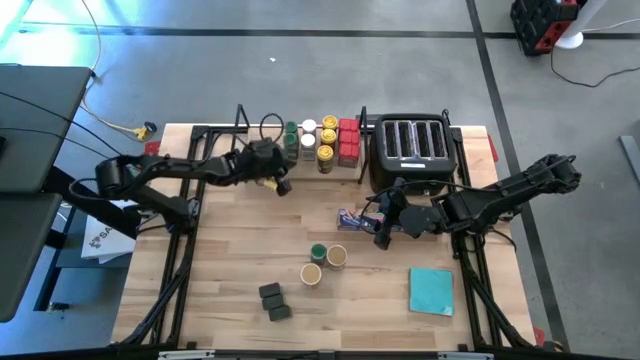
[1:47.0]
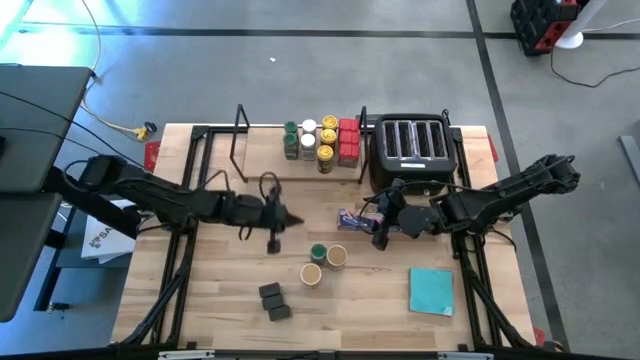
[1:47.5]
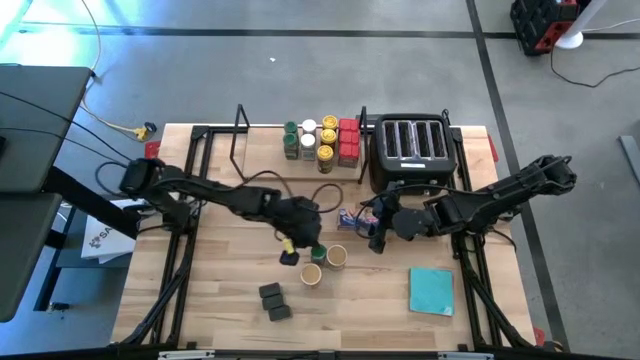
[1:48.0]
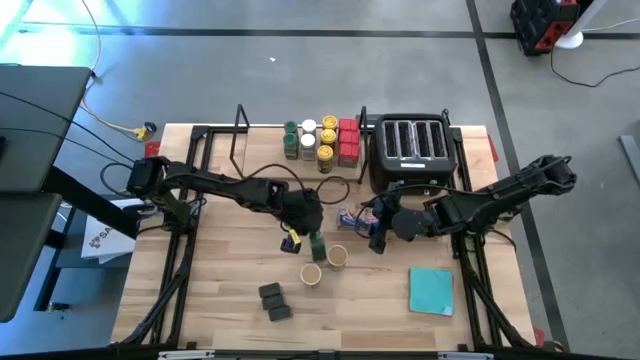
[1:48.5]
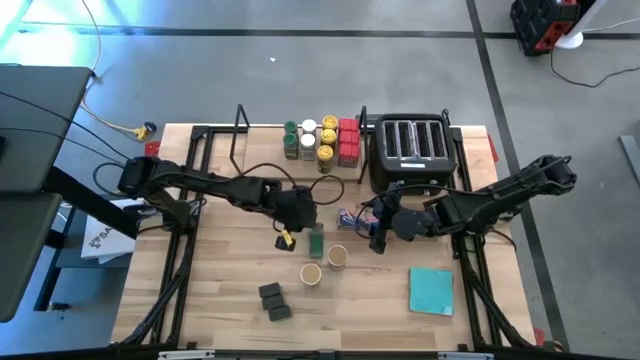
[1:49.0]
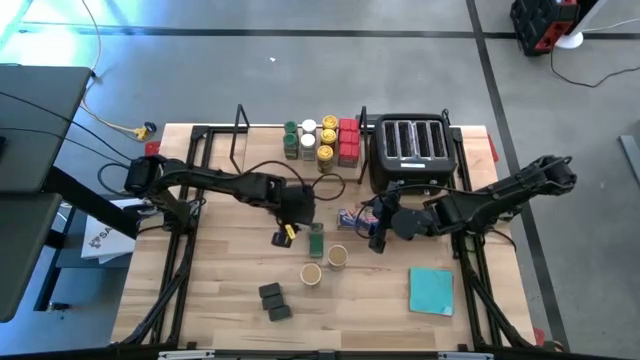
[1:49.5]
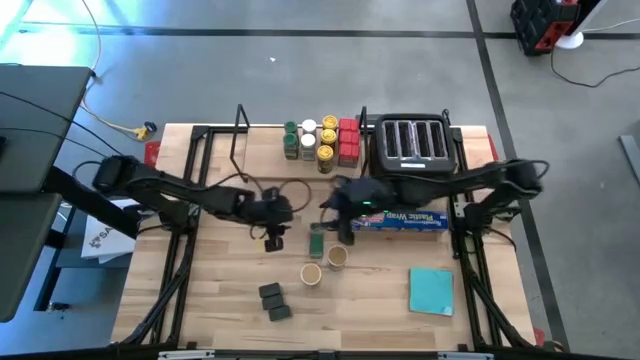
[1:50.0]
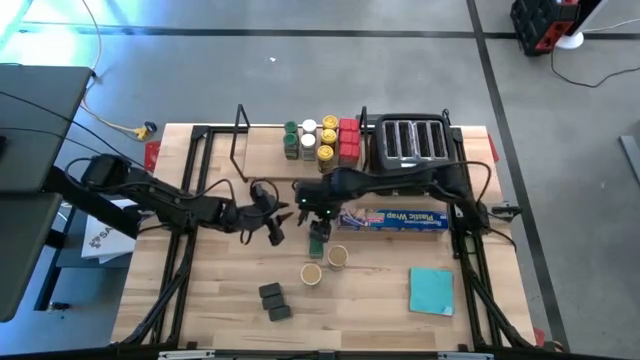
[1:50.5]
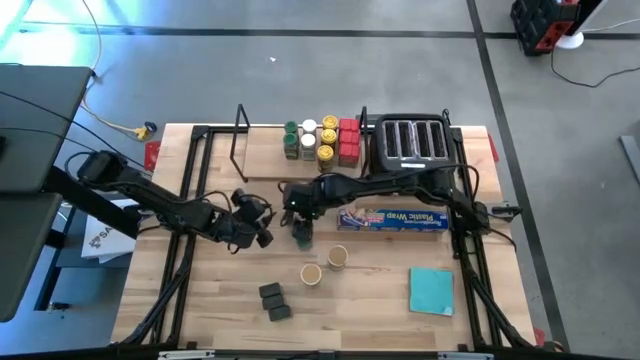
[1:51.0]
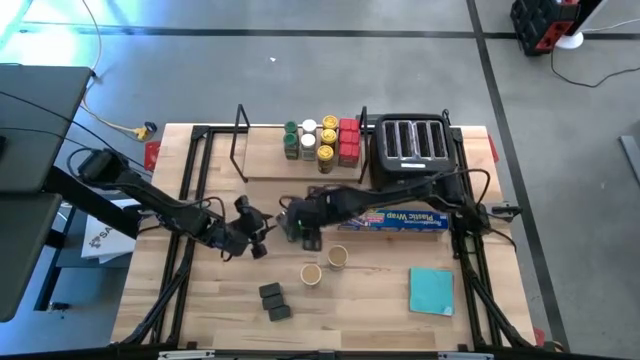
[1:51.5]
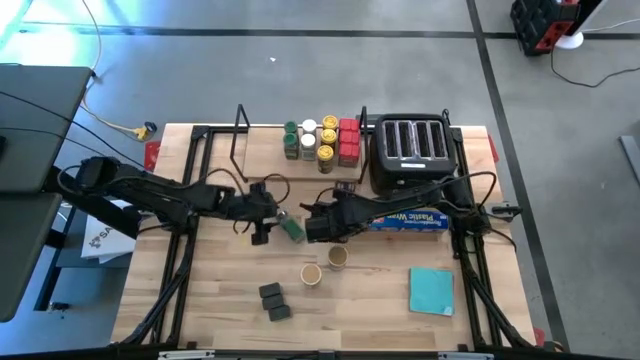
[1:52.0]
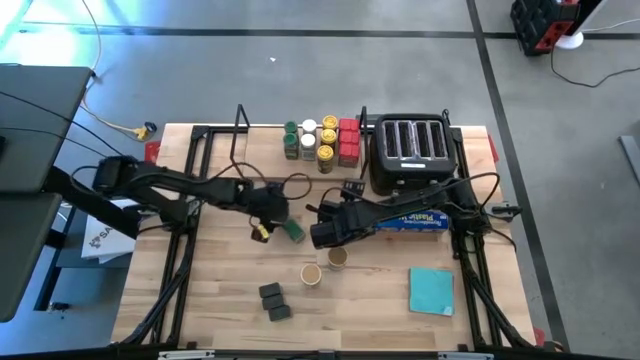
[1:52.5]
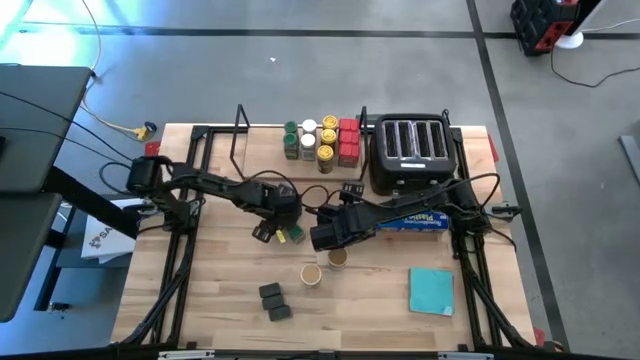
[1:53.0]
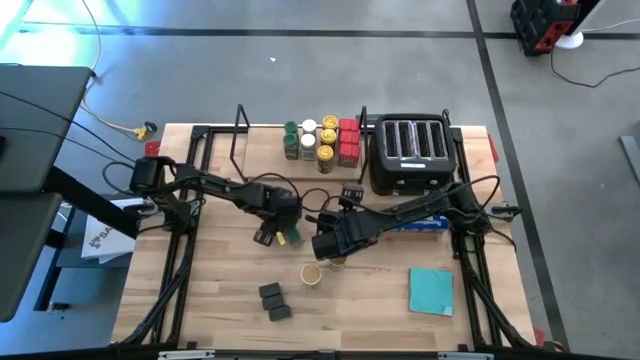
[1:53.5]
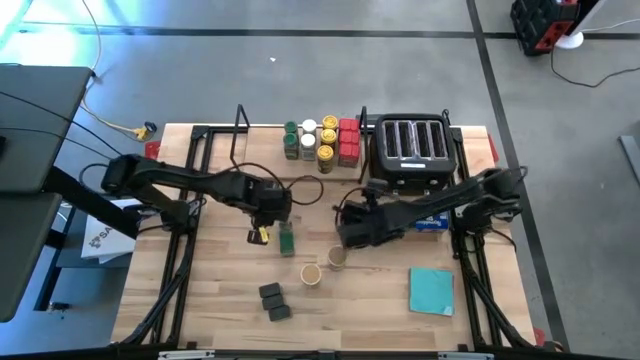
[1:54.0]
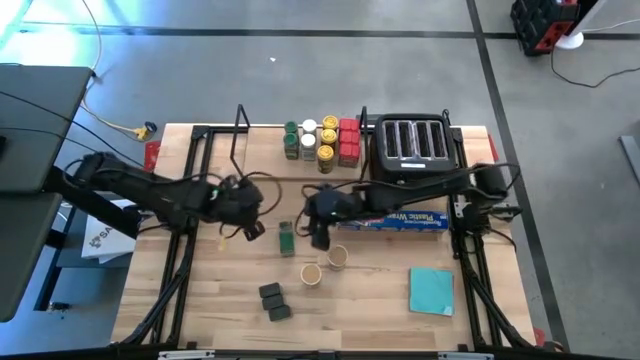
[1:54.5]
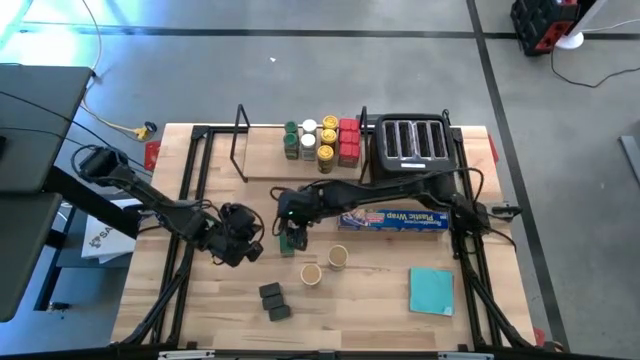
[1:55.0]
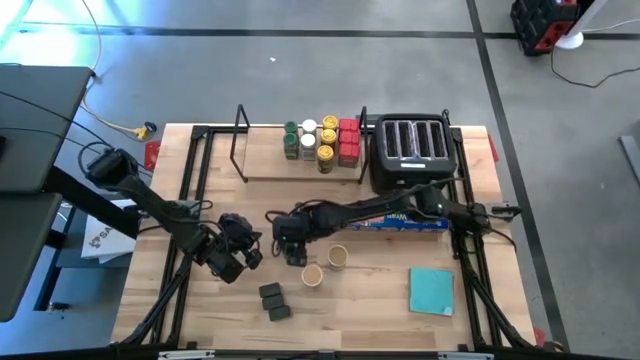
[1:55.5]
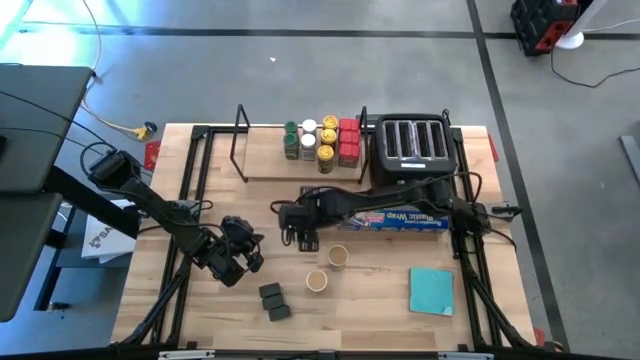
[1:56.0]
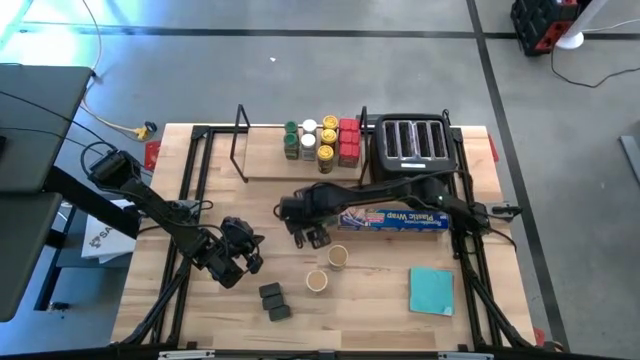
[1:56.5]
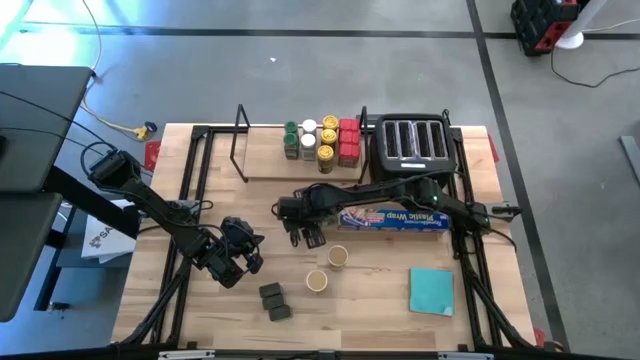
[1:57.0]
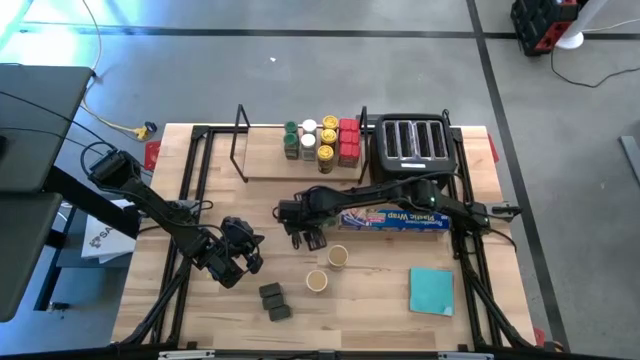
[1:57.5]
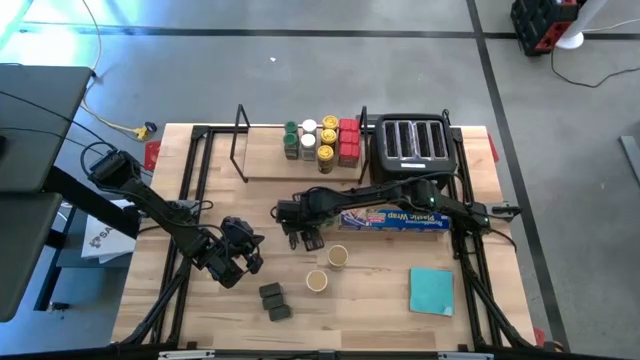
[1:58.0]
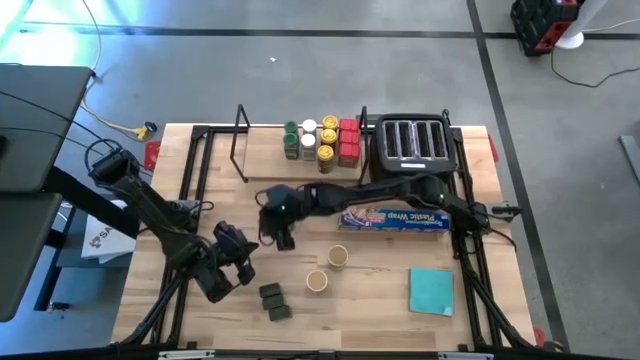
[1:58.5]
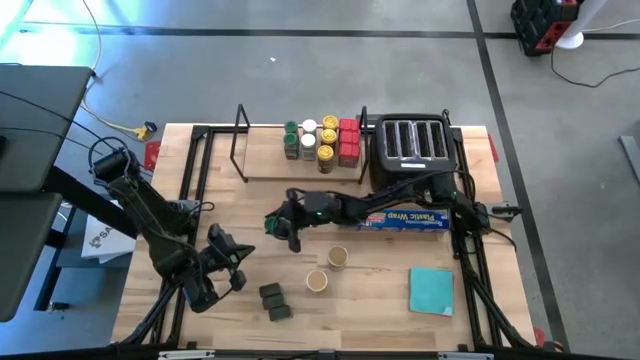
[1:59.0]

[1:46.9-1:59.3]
Task: Shelf spices
Put the green seasoning bottle on the shelf aligned with the other green seasoning bottles

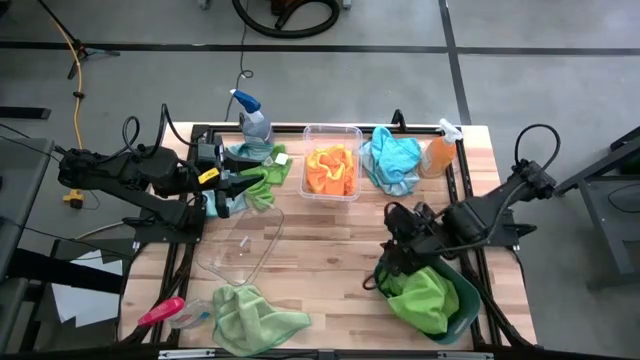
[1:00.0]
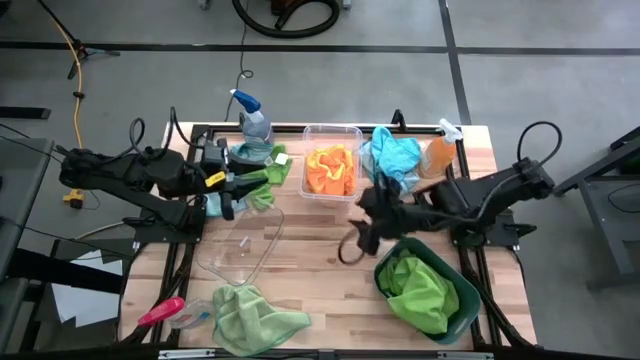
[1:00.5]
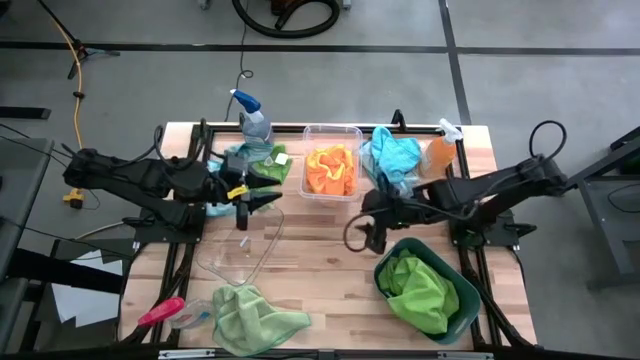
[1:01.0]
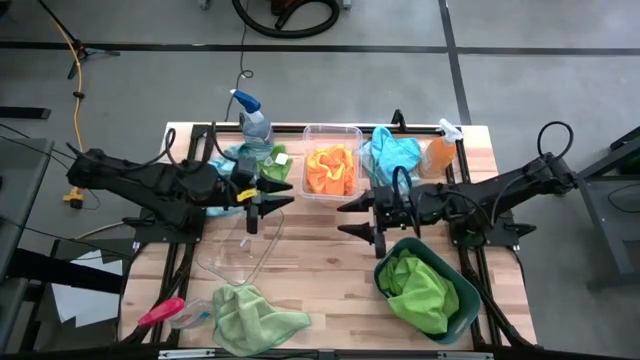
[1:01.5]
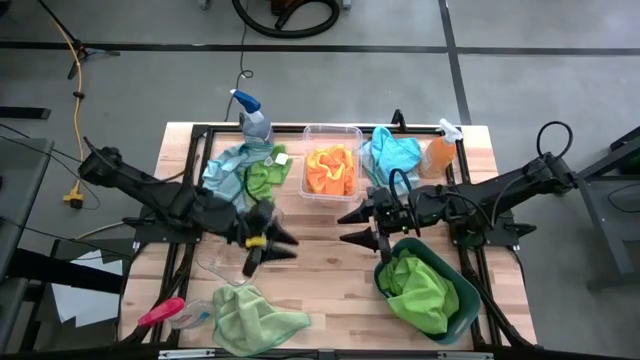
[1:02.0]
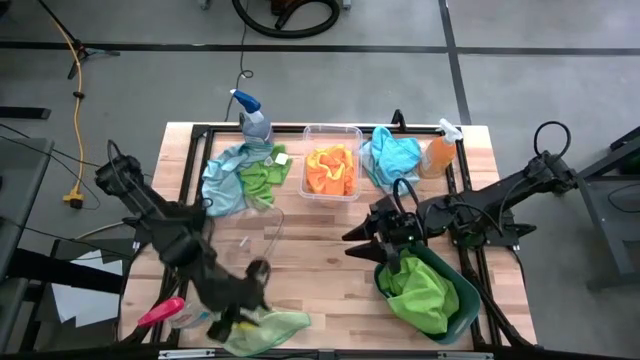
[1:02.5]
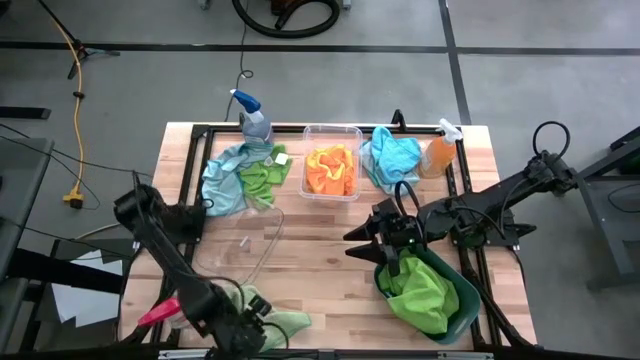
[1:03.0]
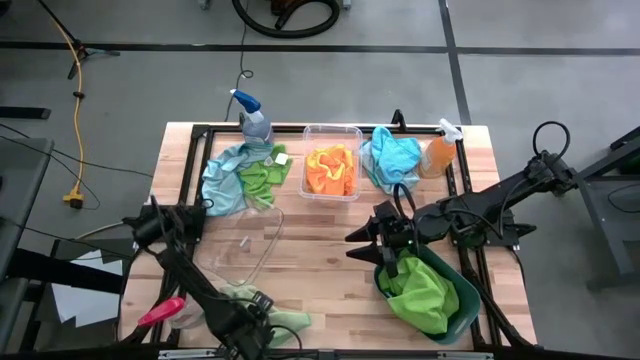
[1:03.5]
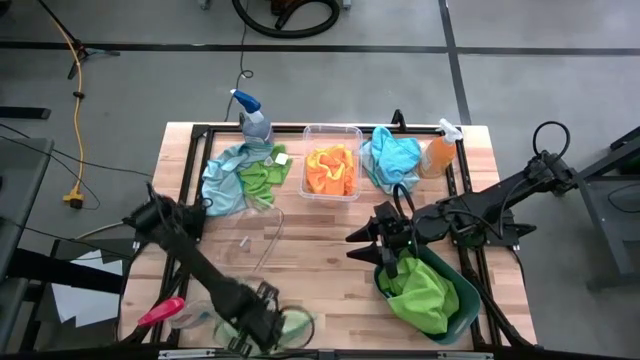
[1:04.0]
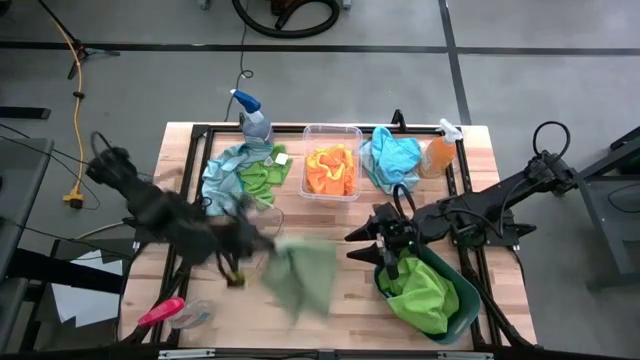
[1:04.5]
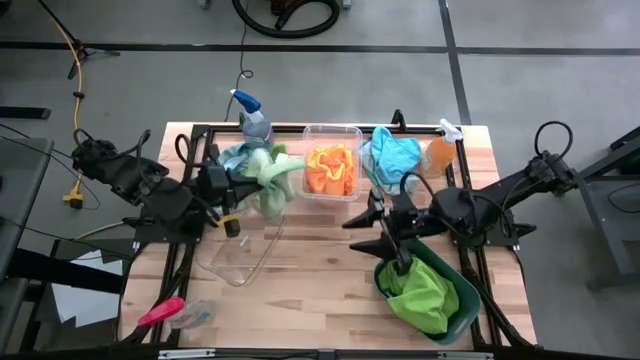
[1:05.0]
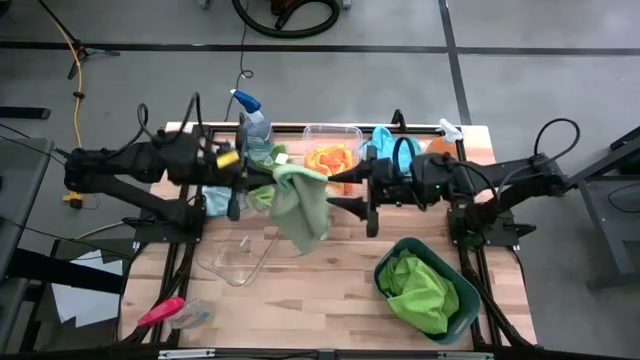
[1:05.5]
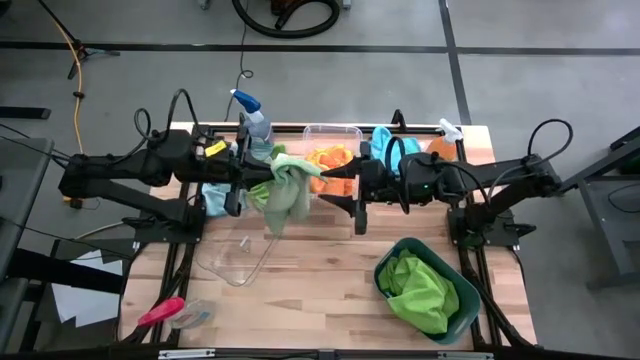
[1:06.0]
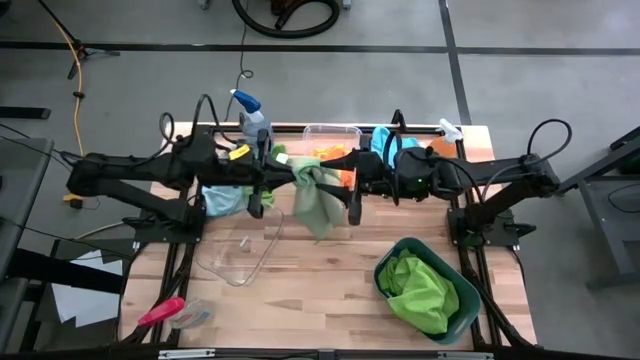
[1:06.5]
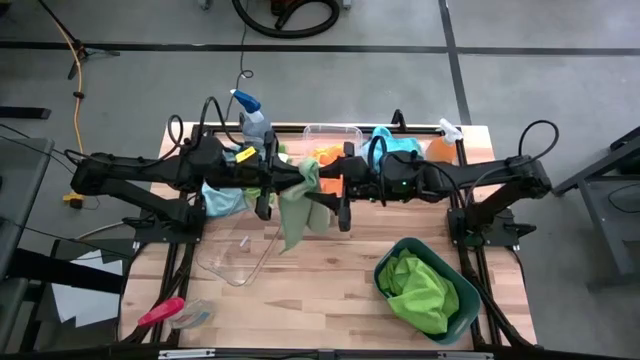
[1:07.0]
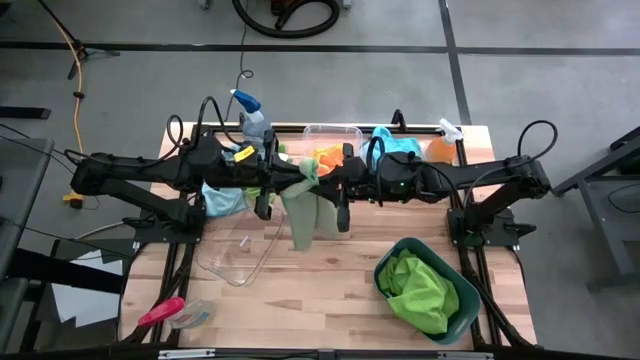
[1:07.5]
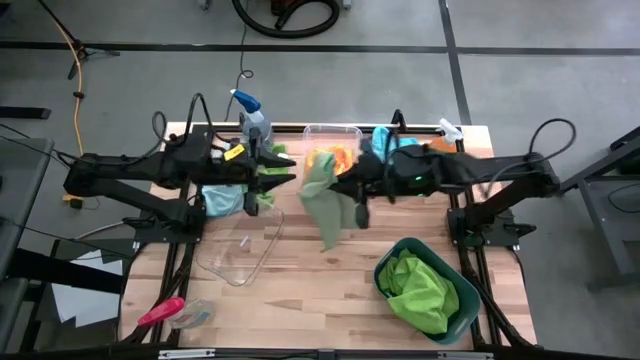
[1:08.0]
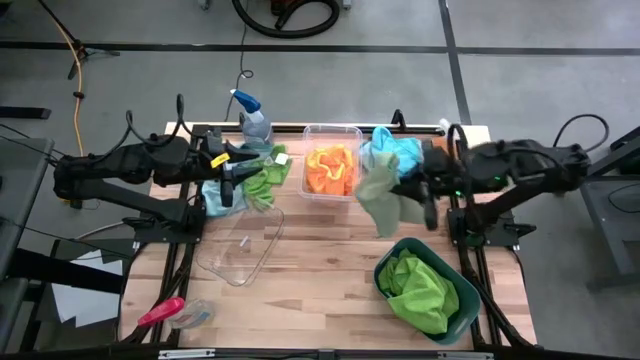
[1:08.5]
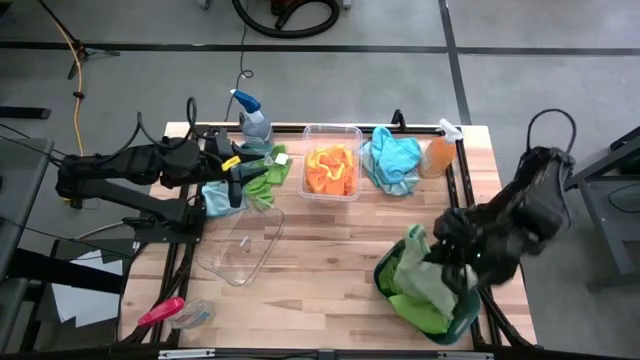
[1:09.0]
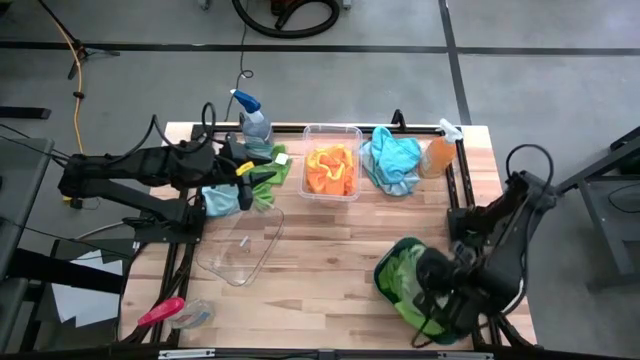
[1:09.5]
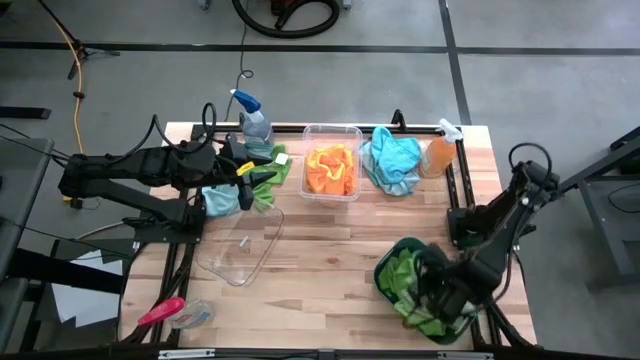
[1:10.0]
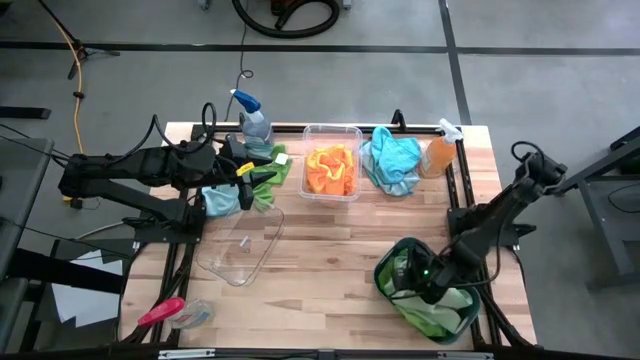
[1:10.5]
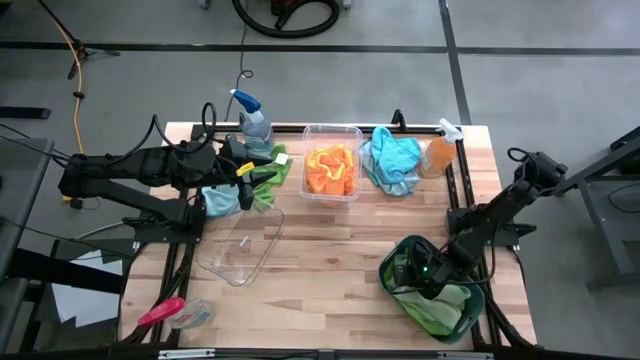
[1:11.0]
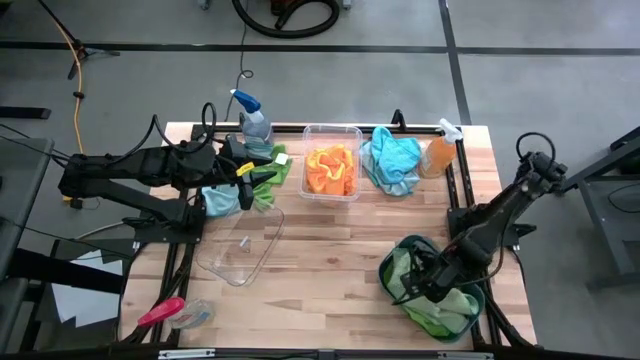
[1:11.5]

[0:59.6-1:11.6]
Task: Sort microfiber towel by color & place in baskets
Put the light green microfiber towel into the green bin
